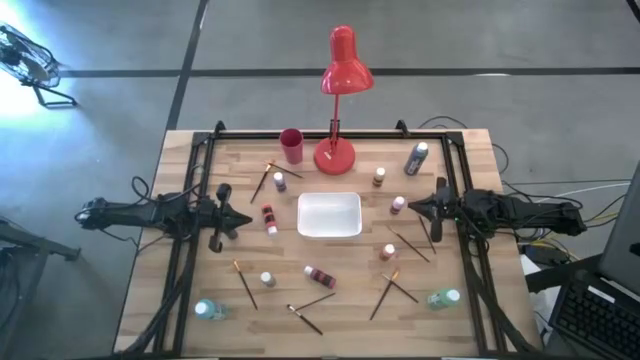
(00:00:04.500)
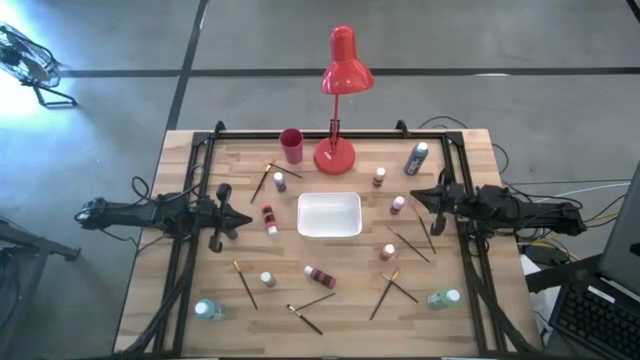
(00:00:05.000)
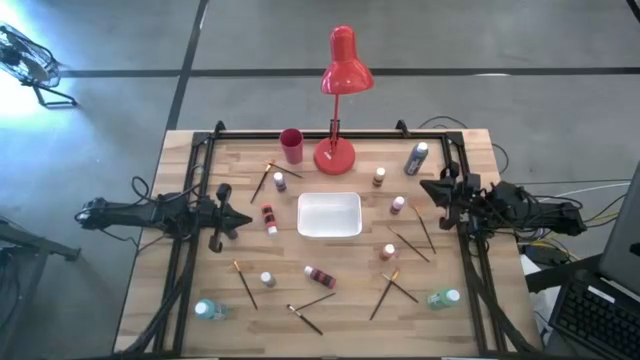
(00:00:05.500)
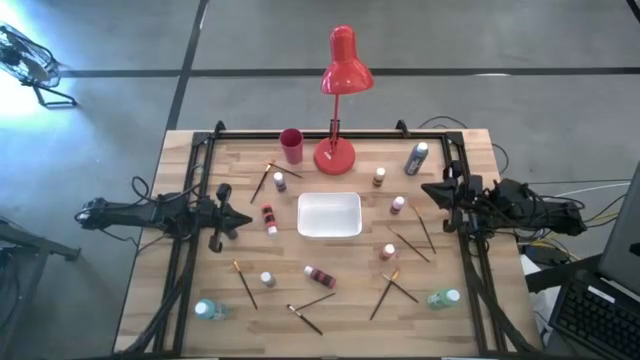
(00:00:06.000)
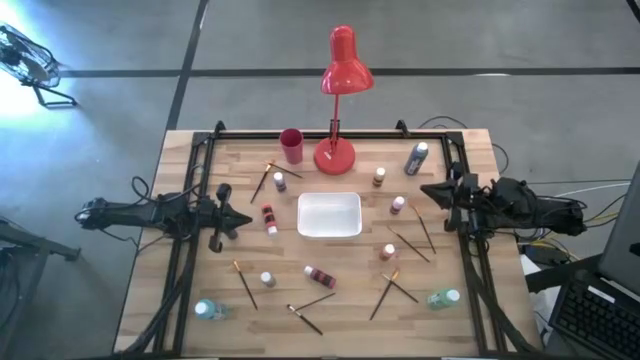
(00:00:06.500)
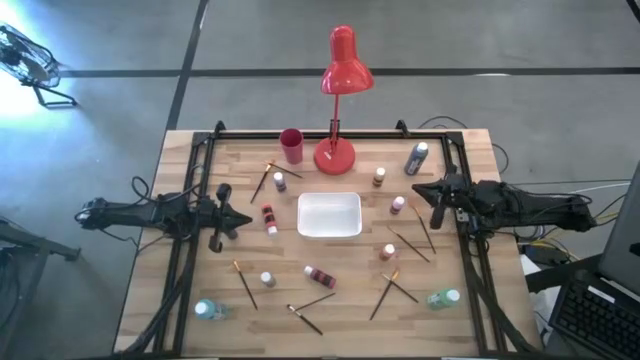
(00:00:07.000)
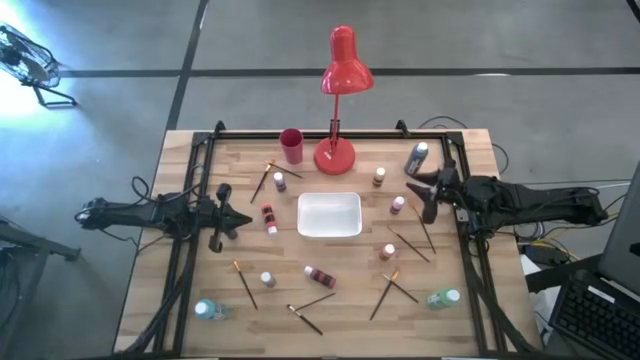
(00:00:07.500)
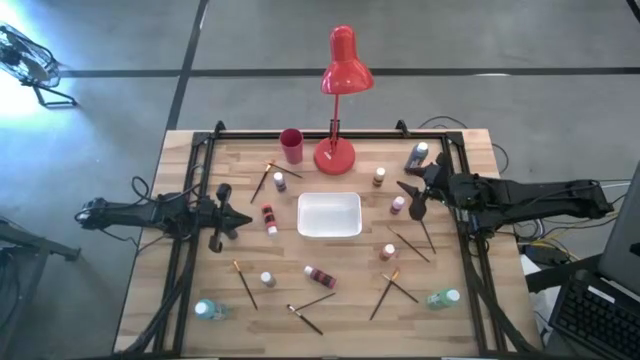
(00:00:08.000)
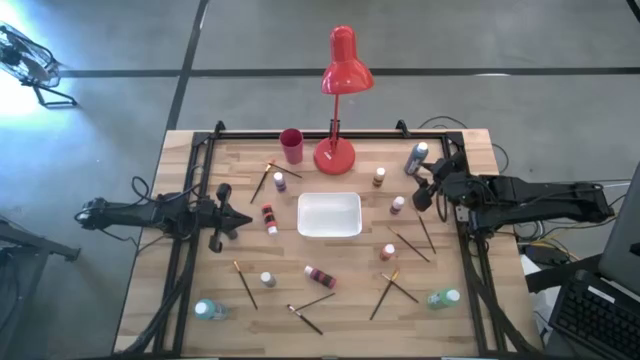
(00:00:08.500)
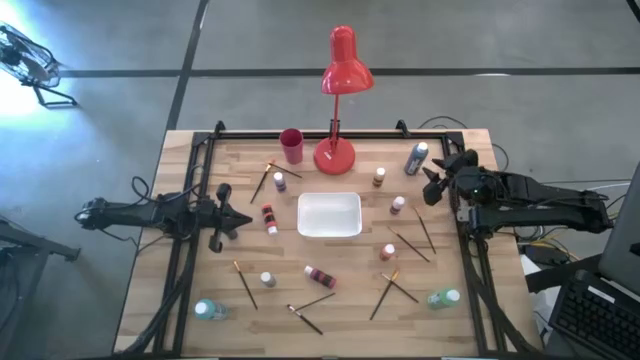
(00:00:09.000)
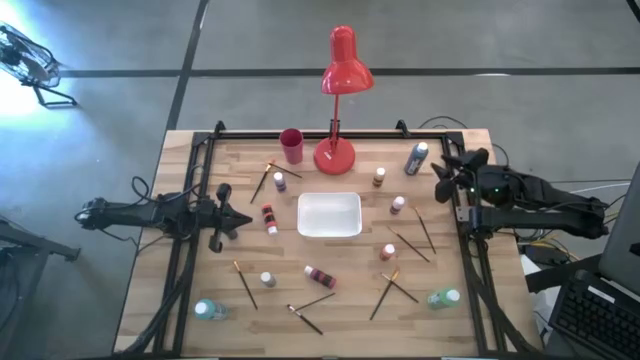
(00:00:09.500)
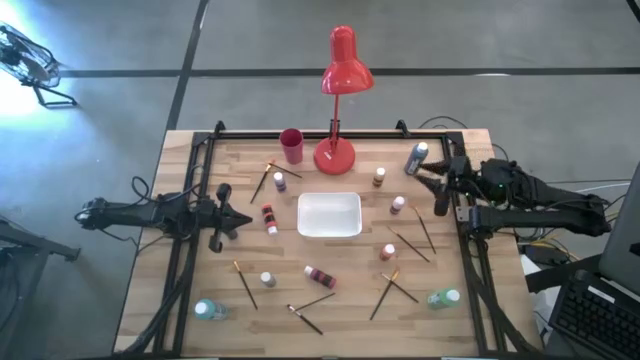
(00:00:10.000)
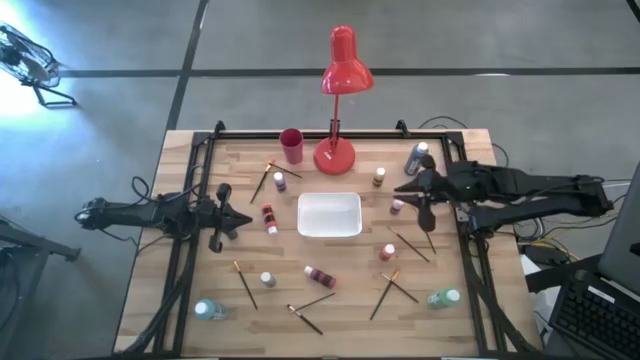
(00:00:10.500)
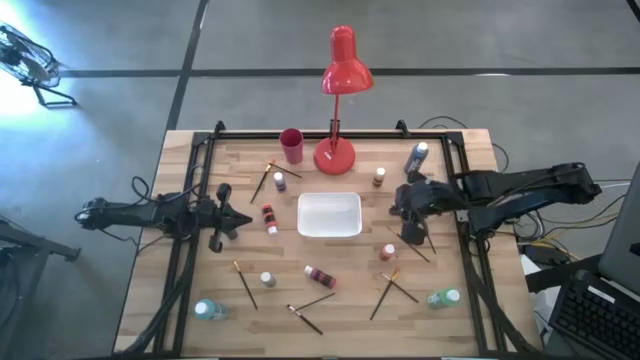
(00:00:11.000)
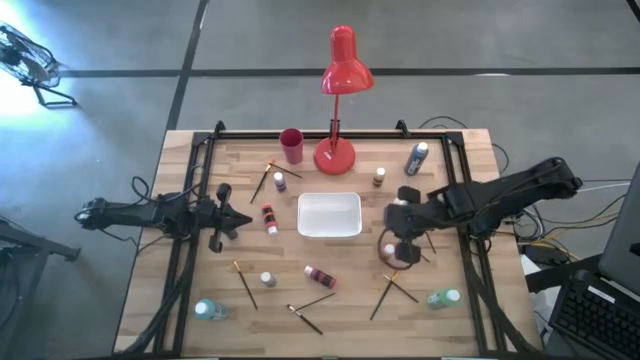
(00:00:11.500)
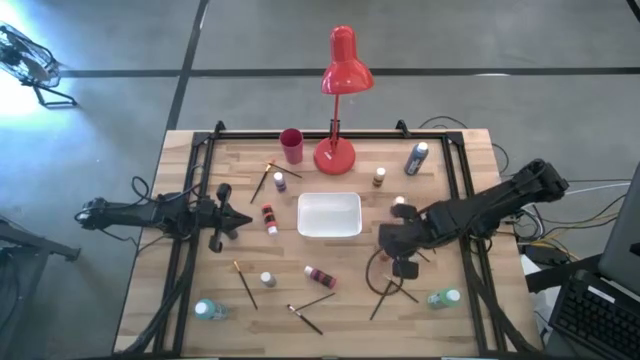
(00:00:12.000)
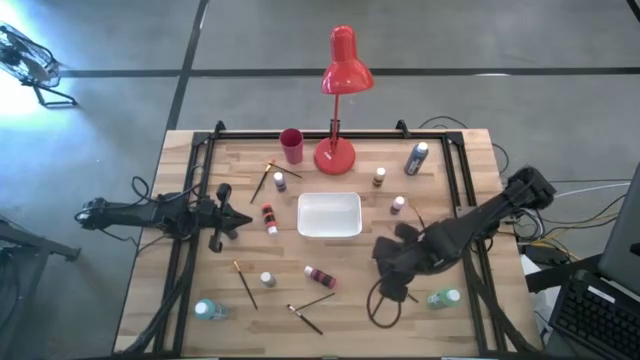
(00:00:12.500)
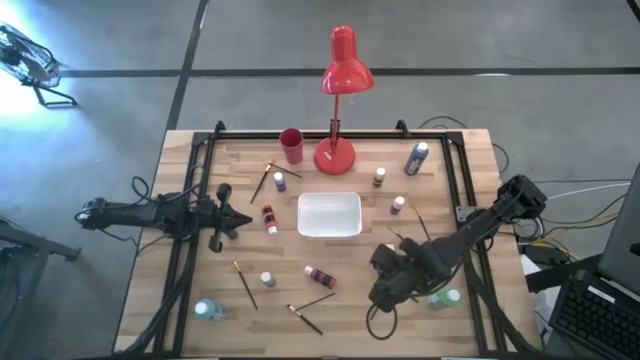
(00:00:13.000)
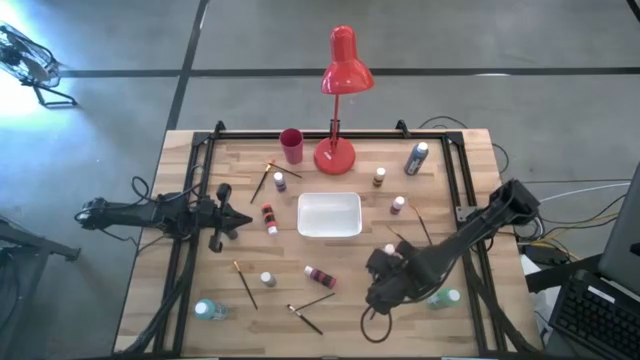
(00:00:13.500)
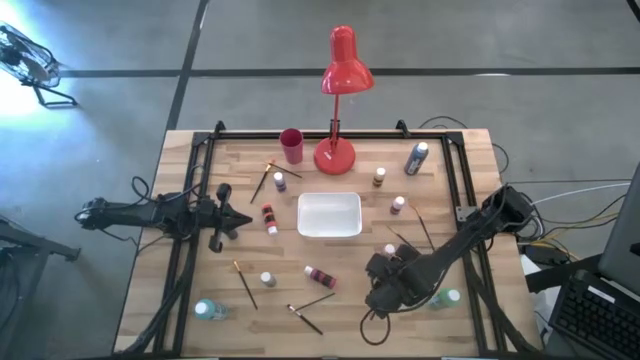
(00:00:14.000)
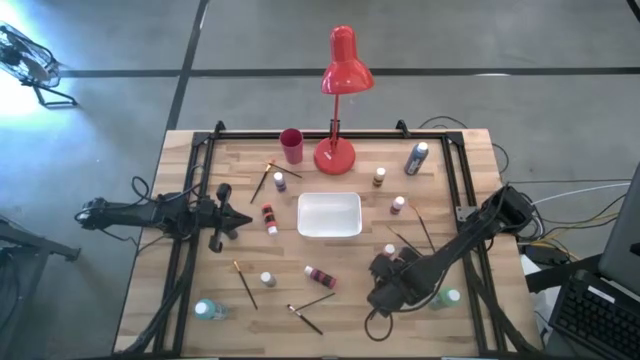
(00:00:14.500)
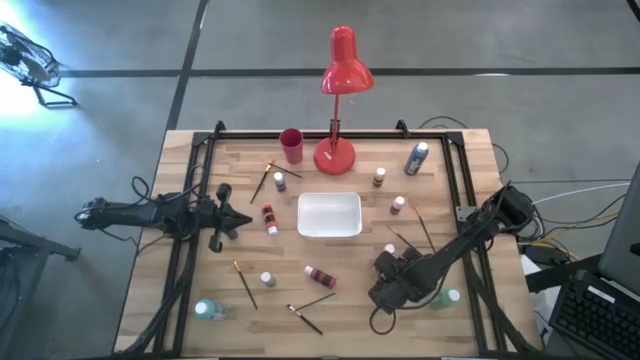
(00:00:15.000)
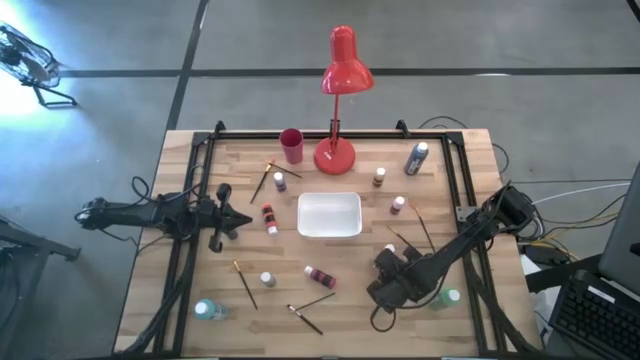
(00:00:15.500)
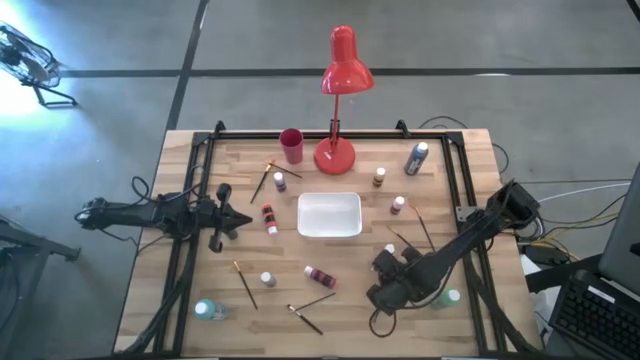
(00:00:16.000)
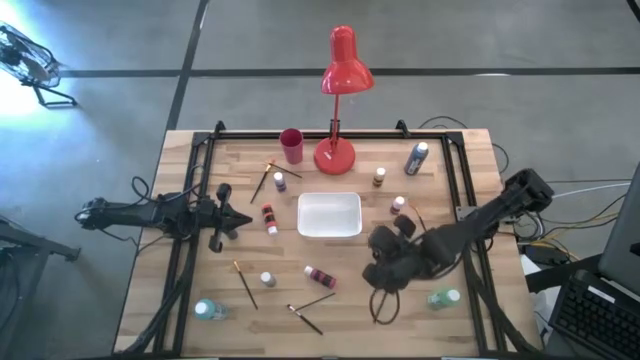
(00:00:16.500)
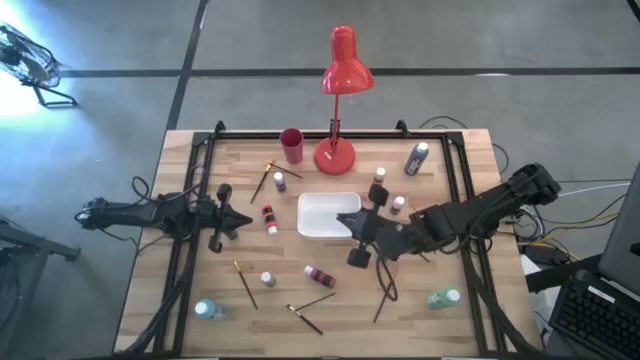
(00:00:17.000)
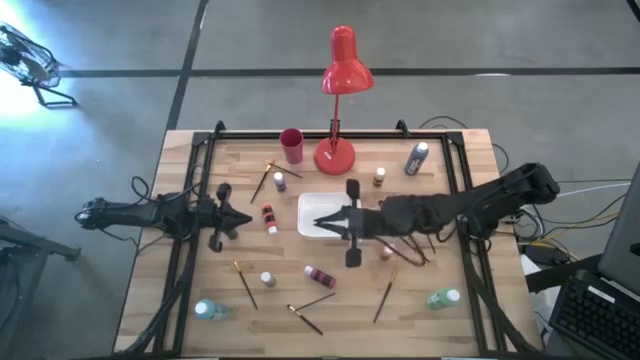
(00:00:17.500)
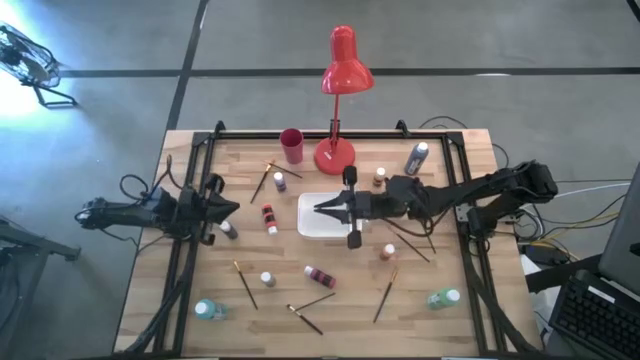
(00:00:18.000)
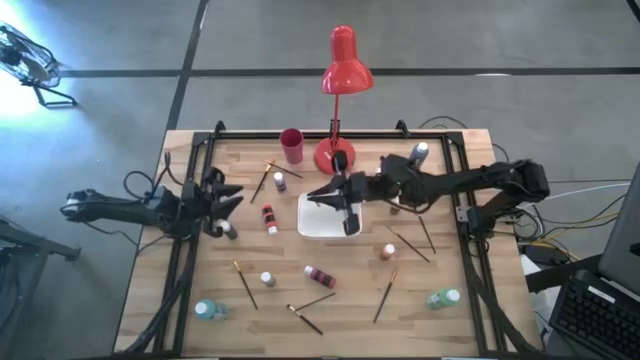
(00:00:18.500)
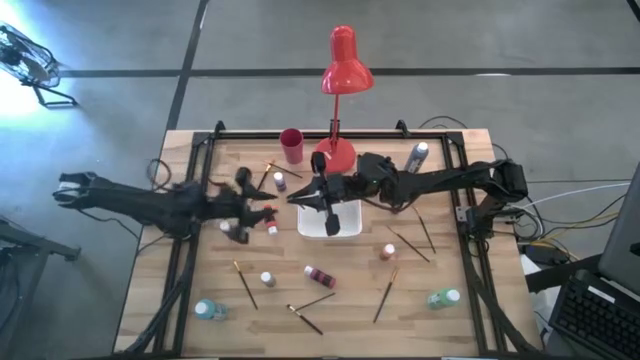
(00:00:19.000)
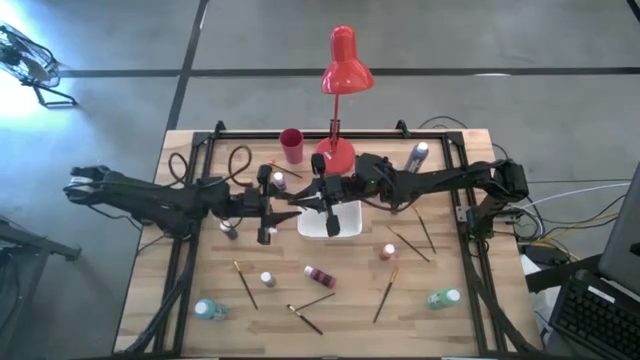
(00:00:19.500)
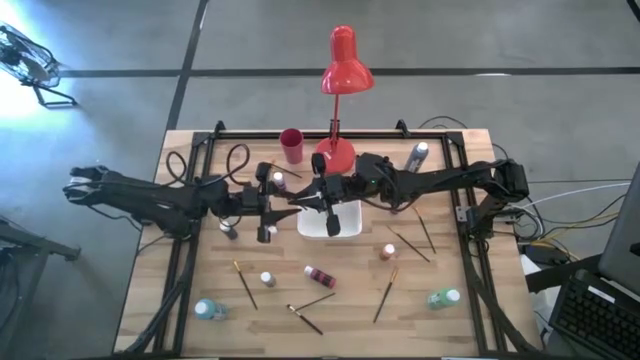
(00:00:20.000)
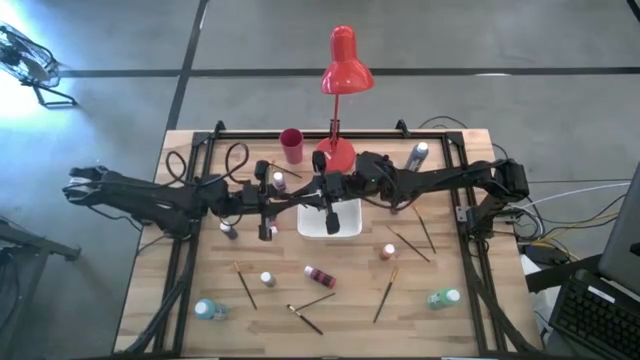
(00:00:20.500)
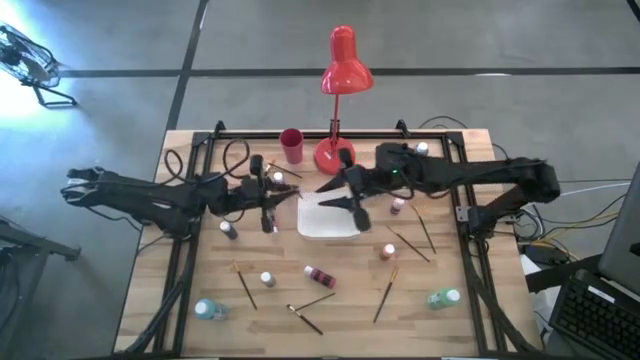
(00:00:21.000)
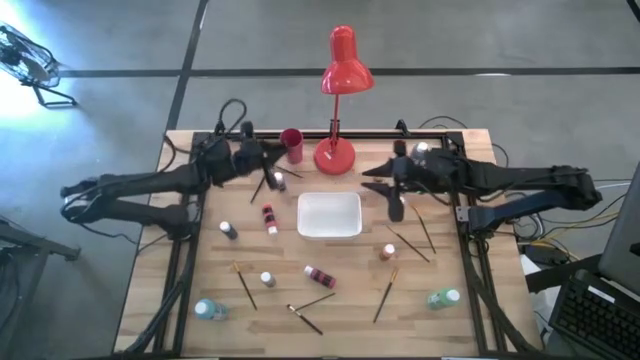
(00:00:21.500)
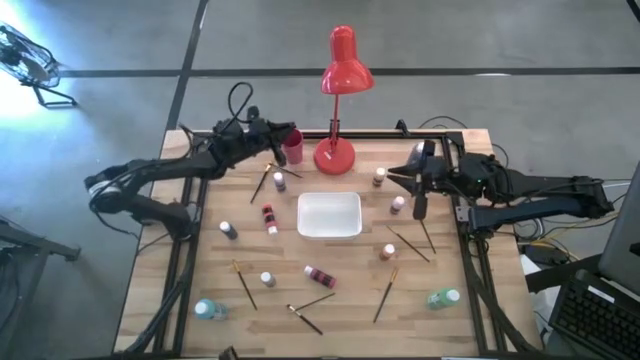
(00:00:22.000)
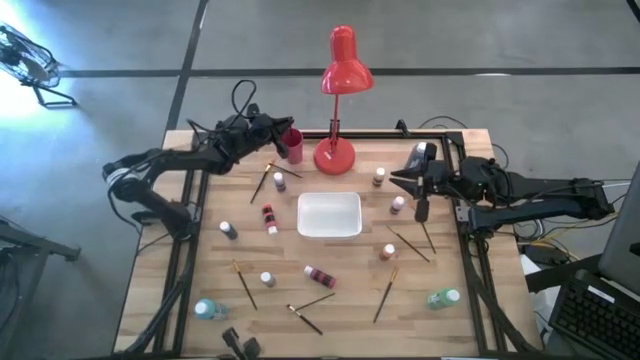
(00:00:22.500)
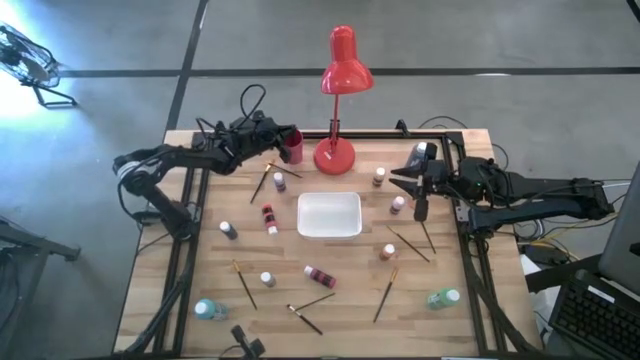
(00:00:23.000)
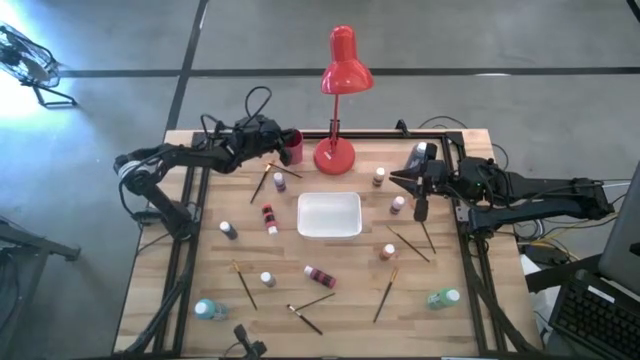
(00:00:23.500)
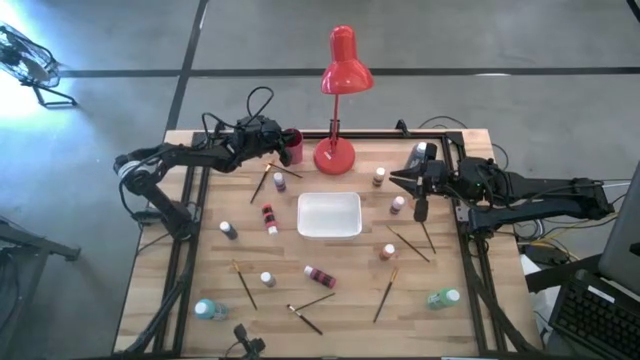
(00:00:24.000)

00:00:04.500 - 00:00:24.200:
Task: Pick & Place Paint Supplies
Put the gold paint brush into the red cup
